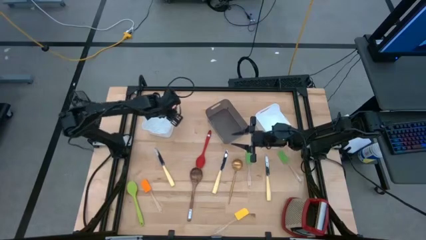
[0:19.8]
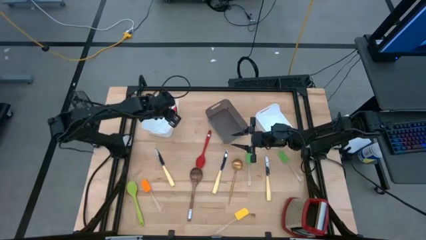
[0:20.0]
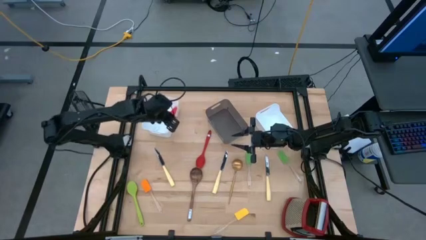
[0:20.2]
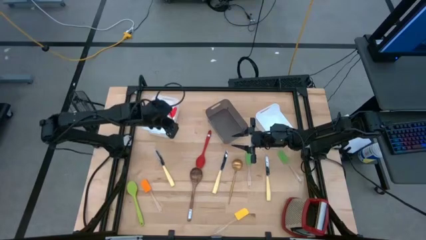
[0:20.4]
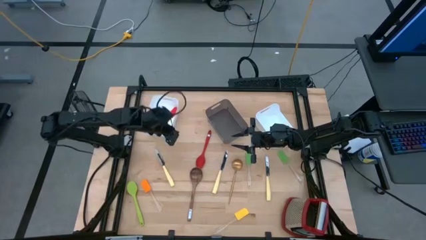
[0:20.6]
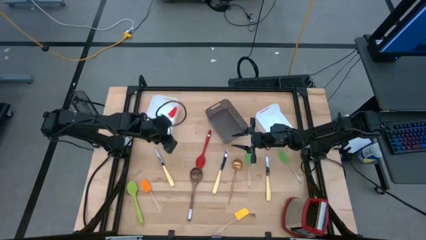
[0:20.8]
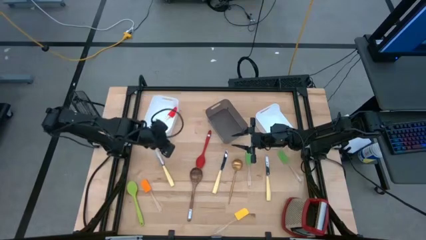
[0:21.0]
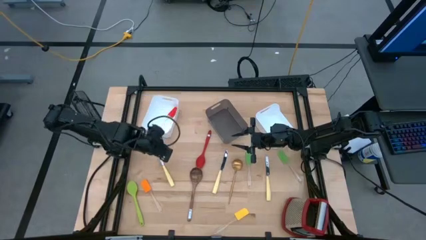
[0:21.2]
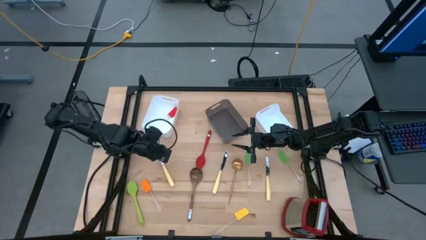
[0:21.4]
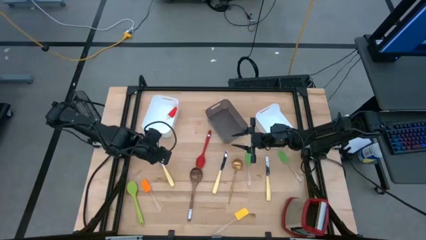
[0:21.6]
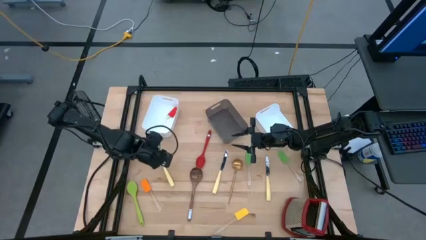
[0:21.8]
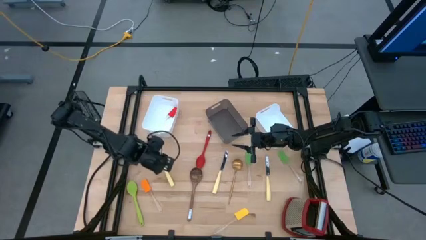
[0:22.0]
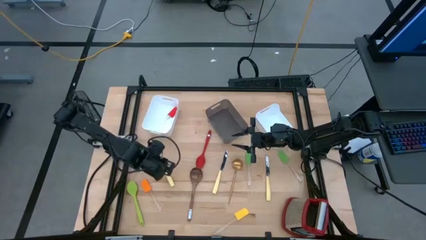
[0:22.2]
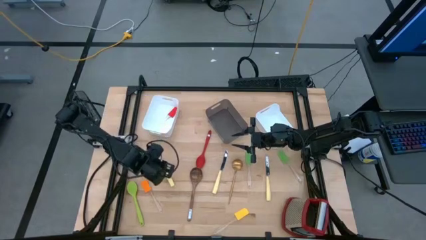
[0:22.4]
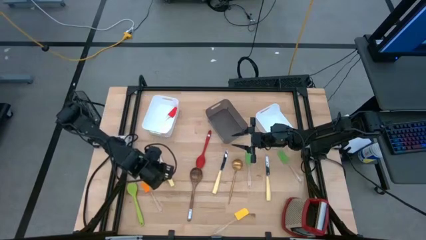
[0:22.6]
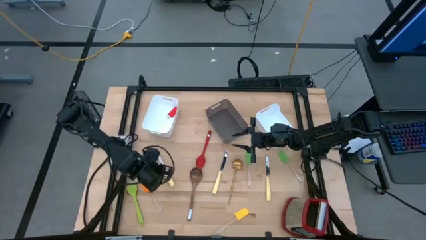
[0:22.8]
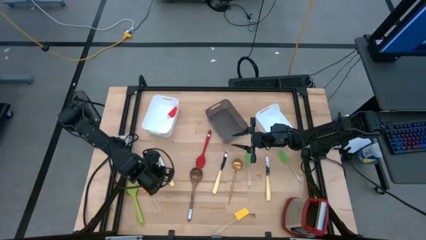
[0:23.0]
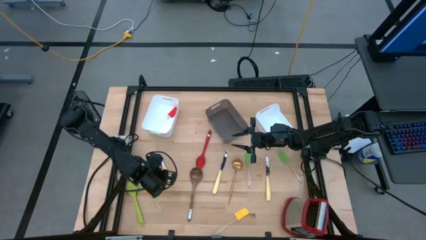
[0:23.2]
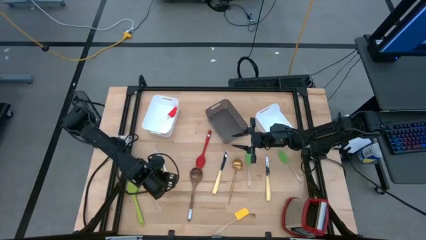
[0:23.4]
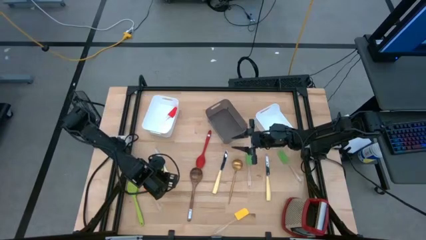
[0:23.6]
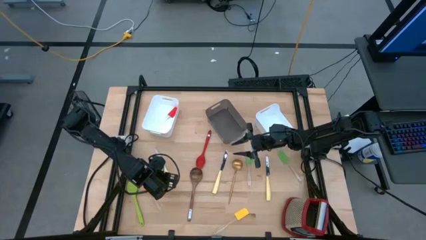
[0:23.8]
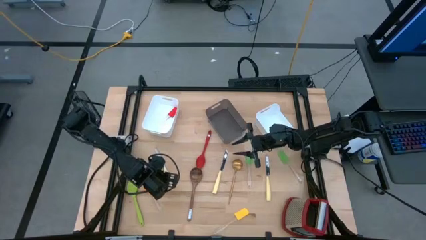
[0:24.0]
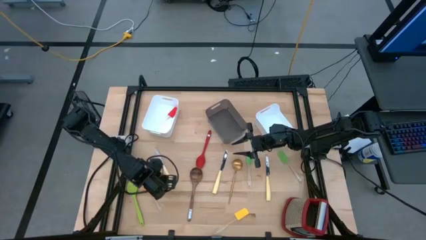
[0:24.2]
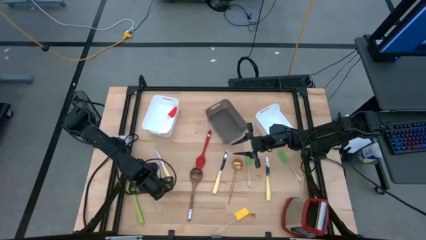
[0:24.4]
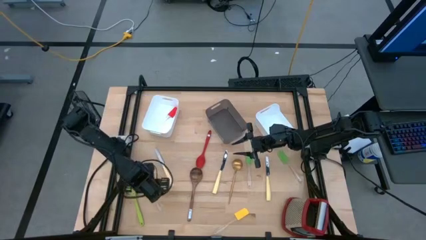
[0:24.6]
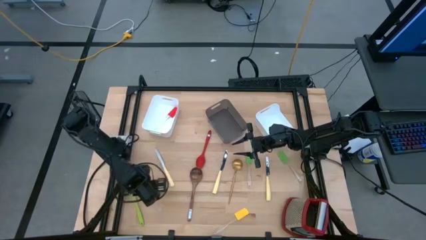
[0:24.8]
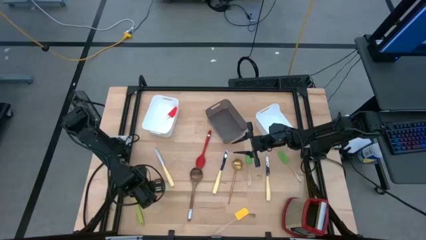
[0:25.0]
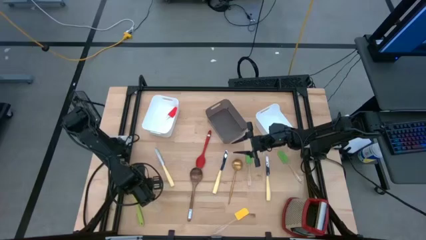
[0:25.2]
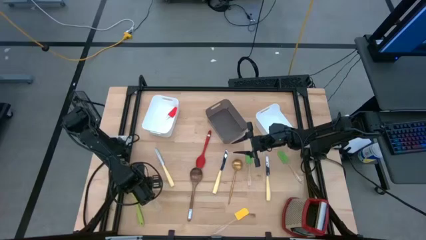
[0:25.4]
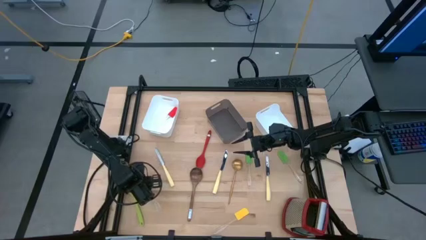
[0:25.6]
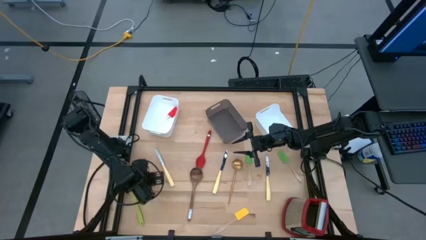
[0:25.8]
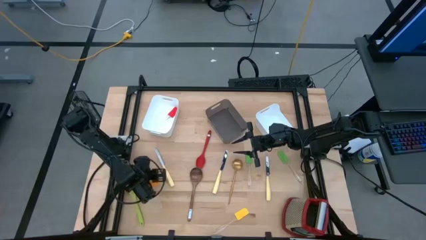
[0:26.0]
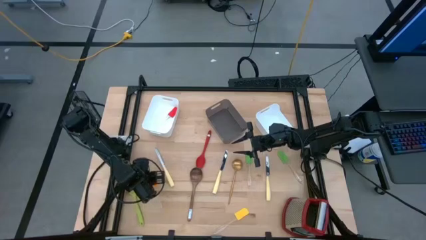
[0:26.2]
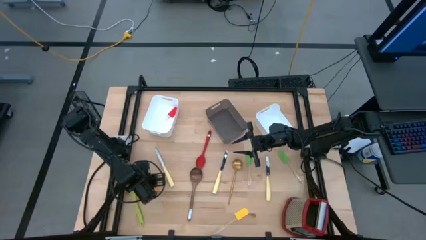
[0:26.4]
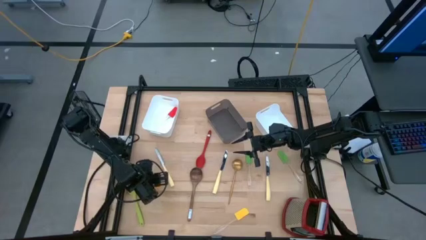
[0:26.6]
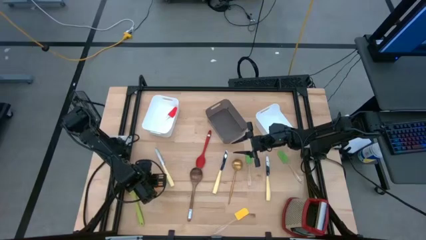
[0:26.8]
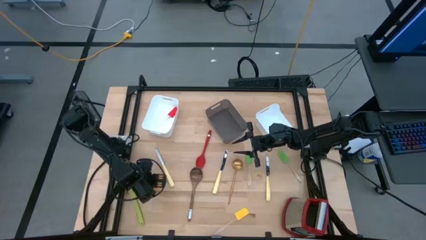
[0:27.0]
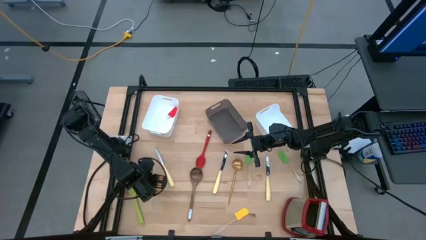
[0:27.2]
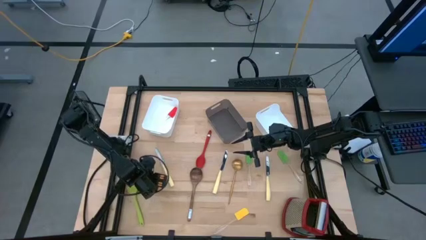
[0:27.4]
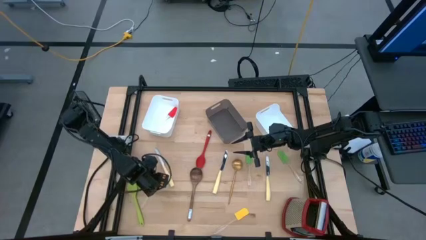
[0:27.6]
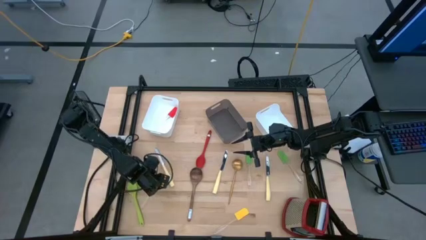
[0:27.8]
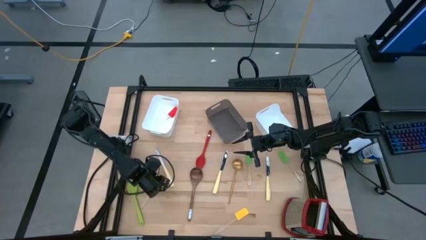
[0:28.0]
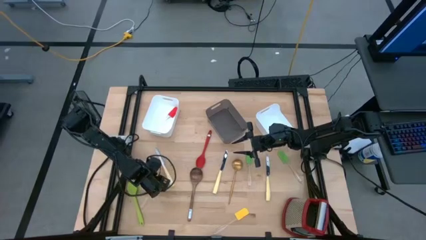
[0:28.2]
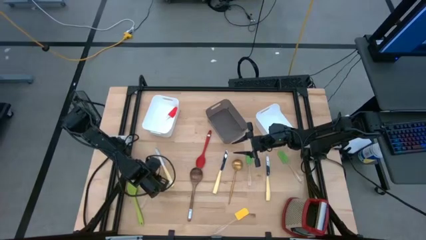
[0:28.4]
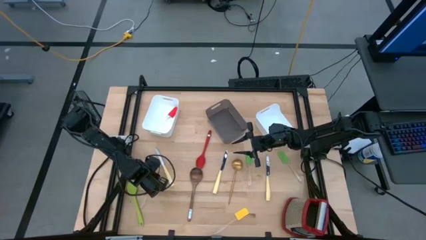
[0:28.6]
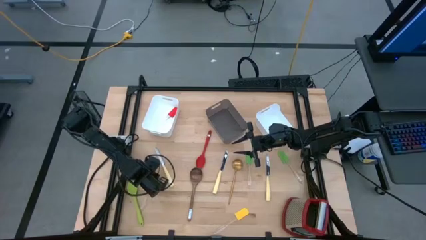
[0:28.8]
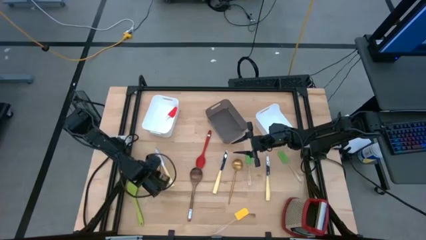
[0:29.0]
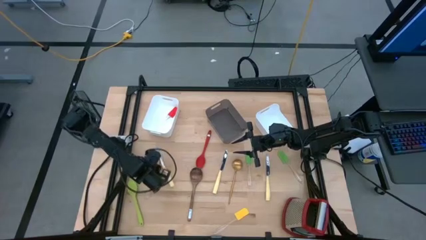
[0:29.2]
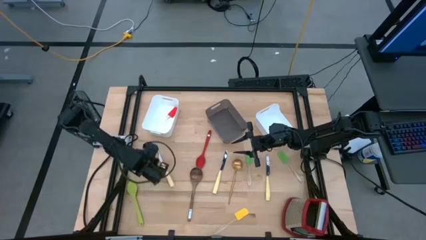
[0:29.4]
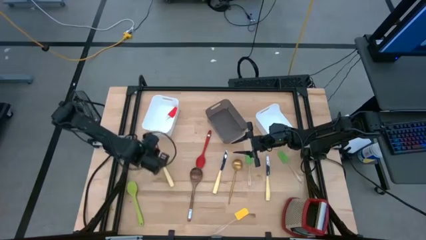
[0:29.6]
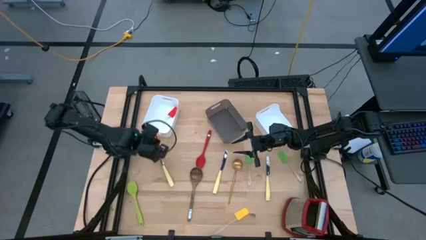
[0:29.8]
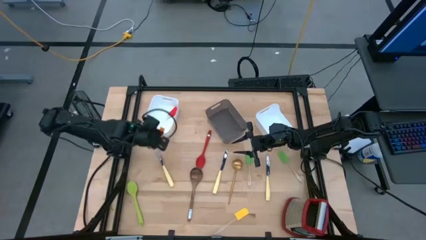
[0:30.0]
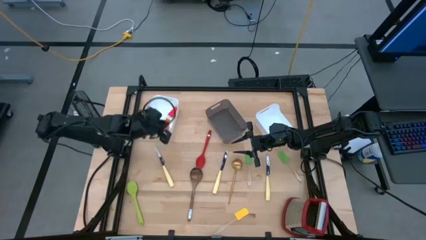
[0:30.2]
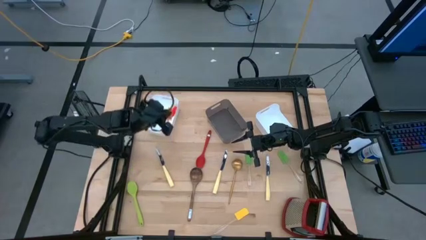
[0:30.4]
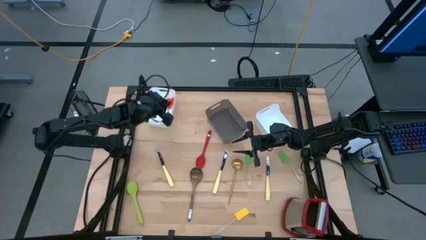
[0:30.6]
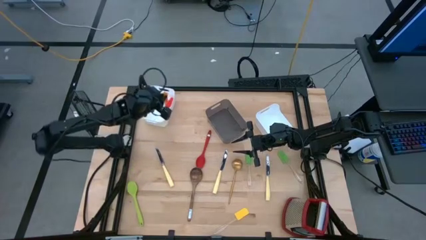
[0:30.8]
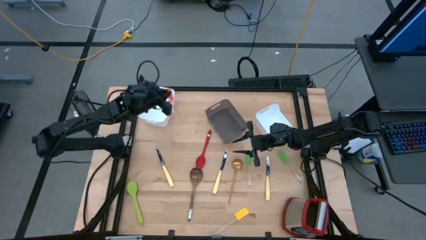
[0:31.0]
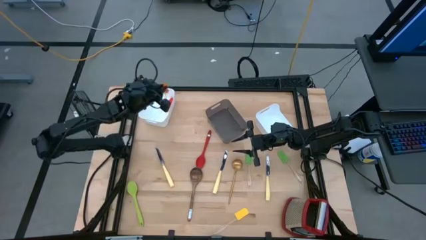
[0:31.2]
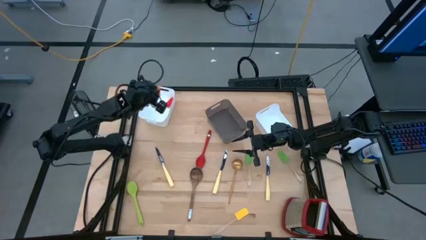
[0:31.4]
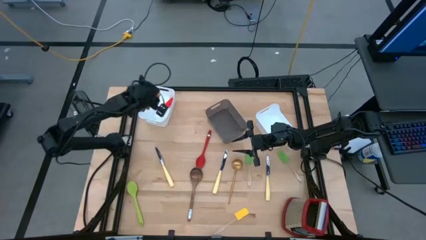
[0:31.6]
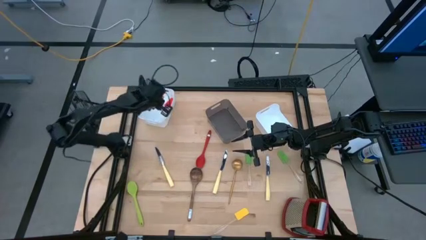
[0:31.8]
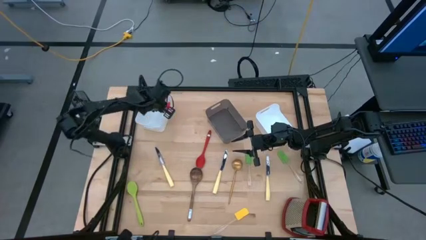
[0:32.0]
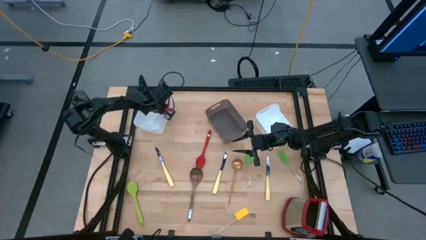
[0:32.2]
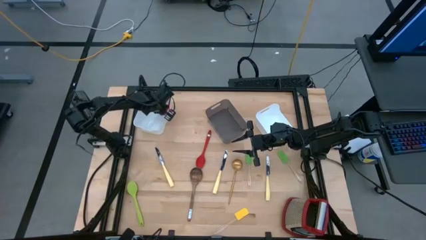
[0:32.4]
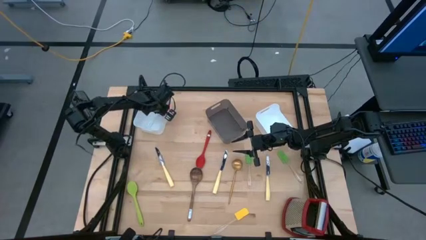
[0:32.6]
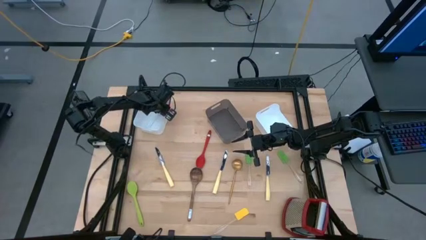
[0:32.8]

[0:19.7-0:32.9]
Task: Pick & Place Kitchen Items
Put the orange spatula into the left white bin
